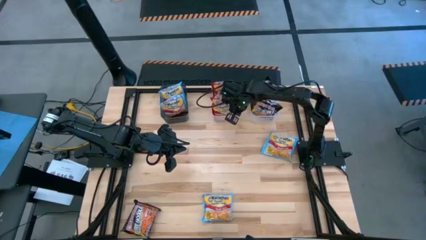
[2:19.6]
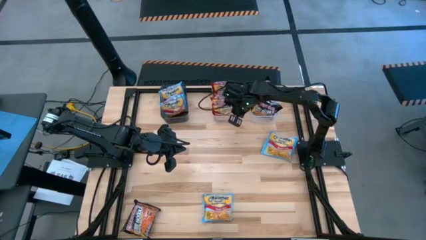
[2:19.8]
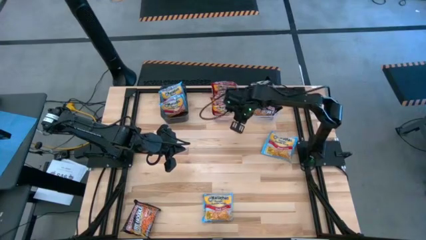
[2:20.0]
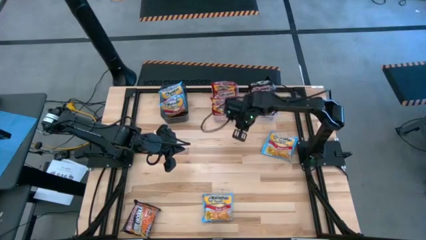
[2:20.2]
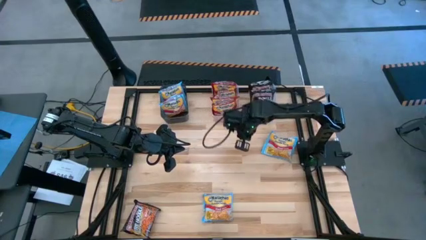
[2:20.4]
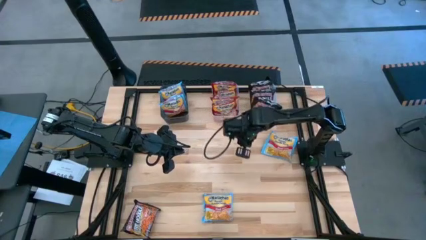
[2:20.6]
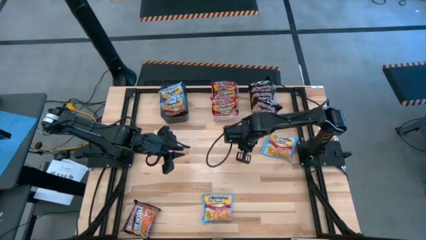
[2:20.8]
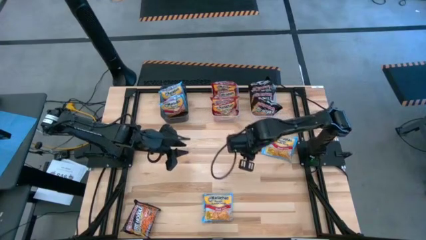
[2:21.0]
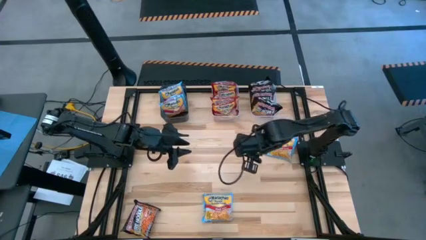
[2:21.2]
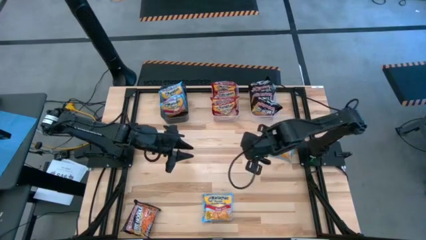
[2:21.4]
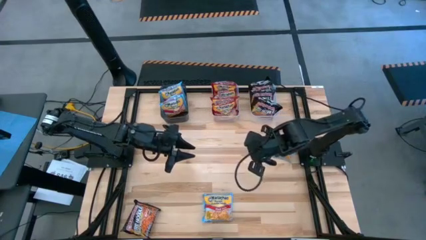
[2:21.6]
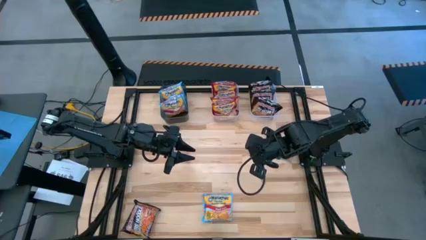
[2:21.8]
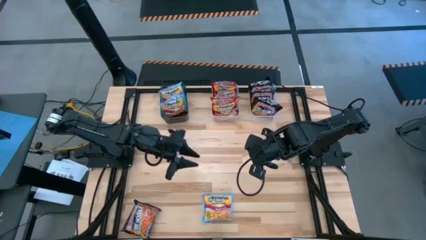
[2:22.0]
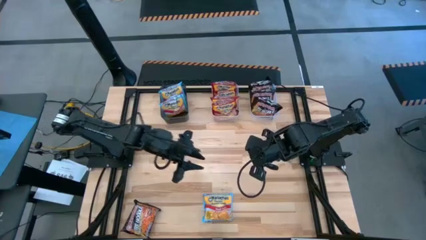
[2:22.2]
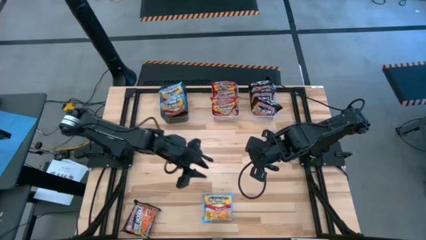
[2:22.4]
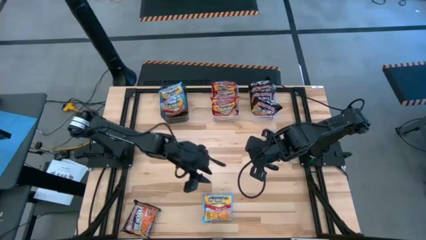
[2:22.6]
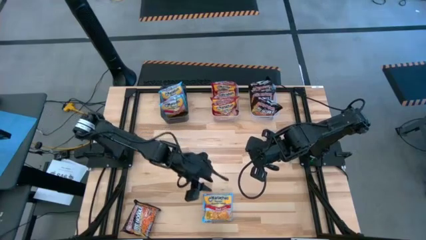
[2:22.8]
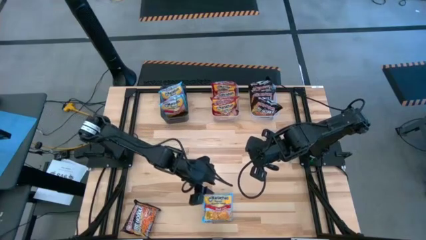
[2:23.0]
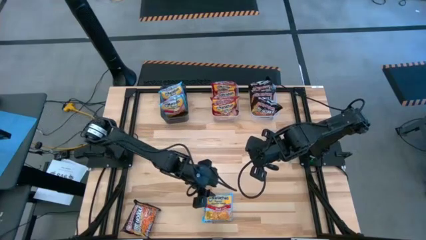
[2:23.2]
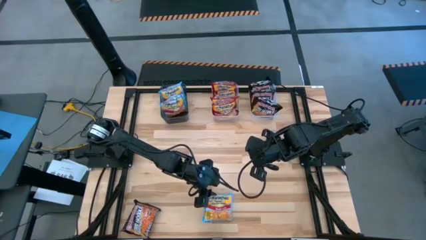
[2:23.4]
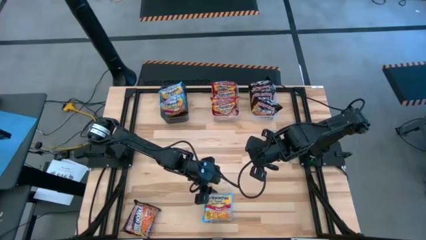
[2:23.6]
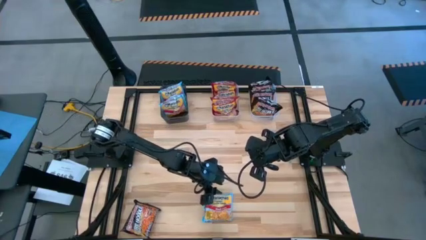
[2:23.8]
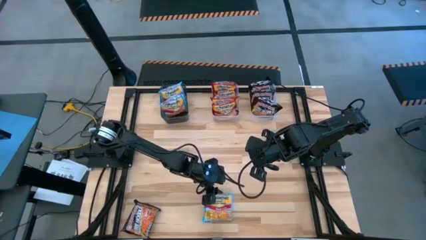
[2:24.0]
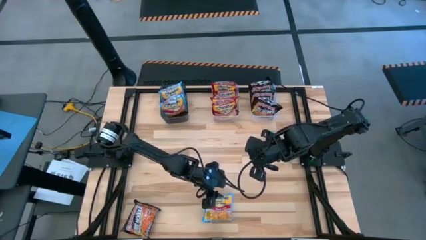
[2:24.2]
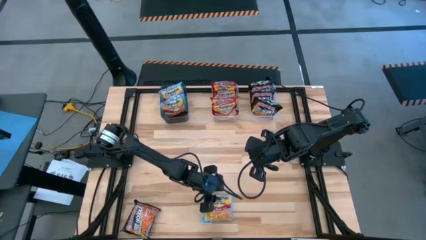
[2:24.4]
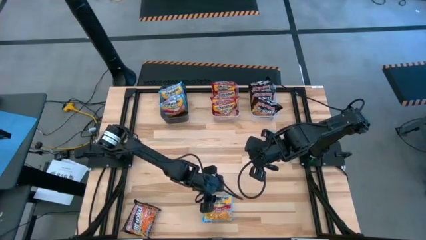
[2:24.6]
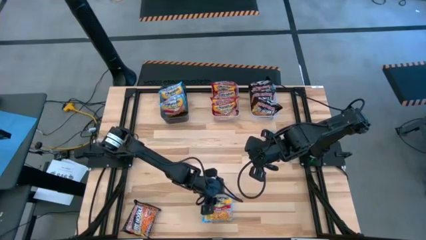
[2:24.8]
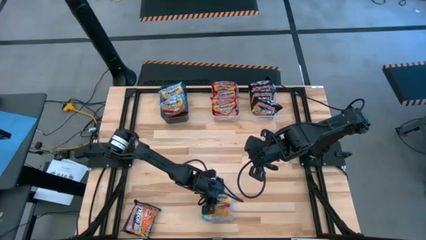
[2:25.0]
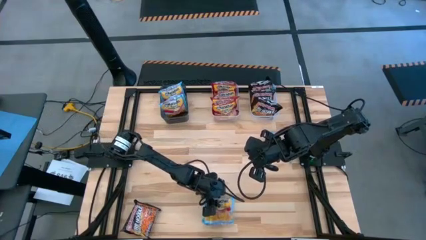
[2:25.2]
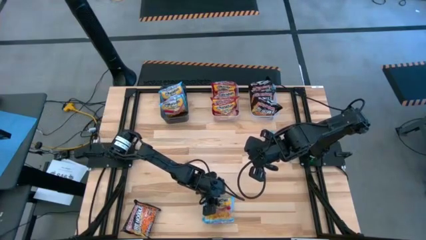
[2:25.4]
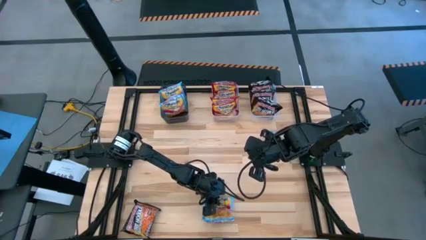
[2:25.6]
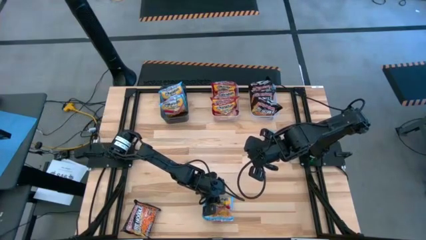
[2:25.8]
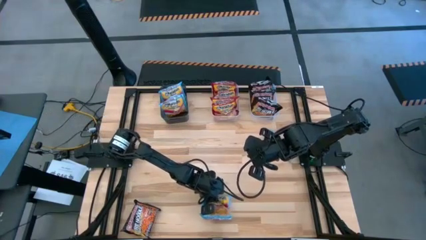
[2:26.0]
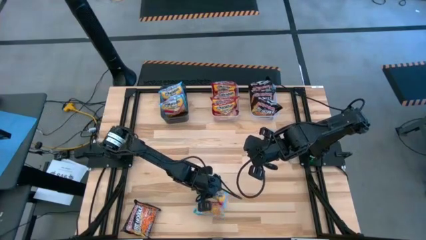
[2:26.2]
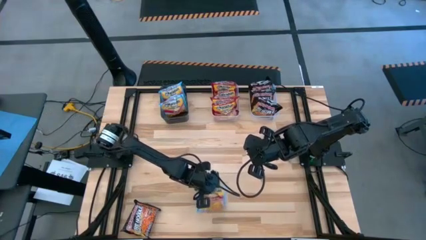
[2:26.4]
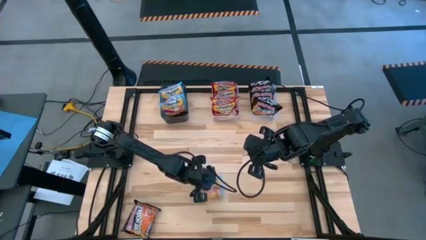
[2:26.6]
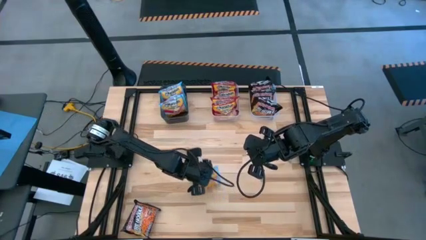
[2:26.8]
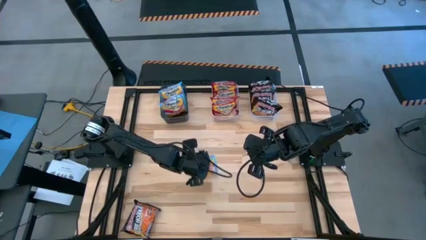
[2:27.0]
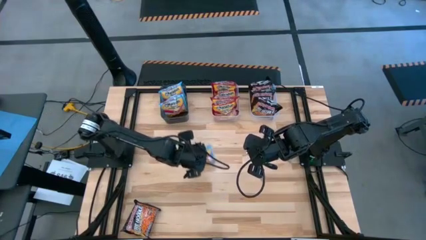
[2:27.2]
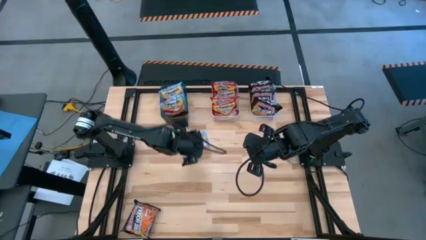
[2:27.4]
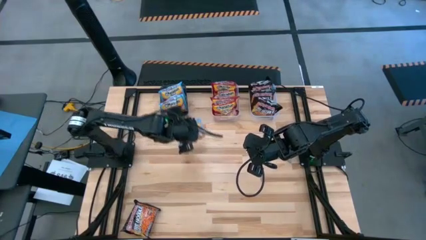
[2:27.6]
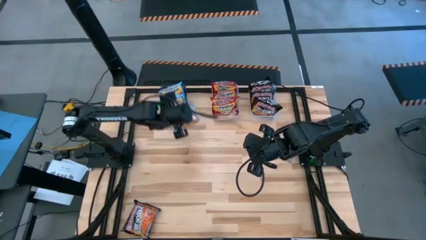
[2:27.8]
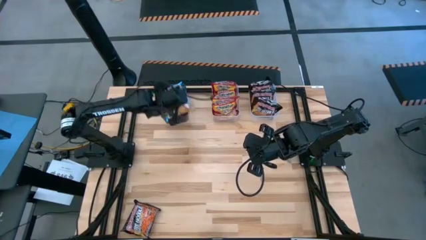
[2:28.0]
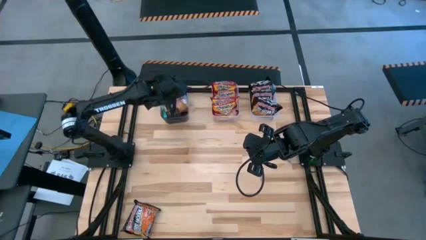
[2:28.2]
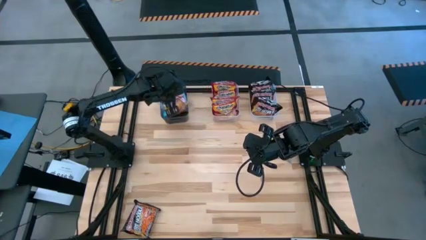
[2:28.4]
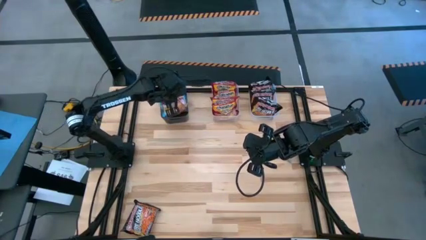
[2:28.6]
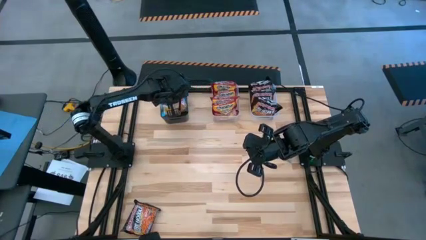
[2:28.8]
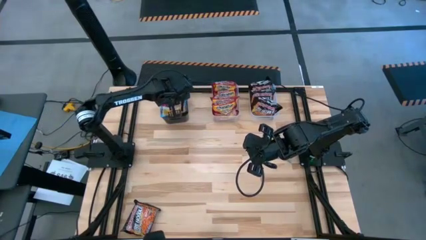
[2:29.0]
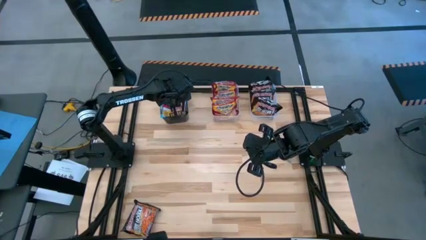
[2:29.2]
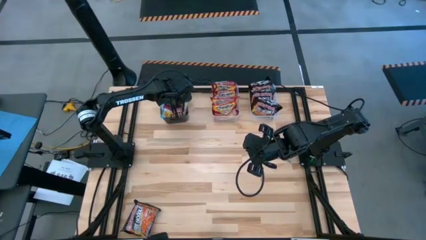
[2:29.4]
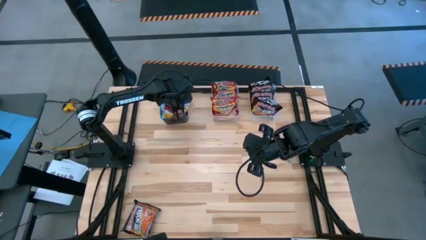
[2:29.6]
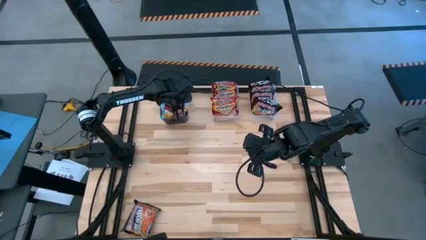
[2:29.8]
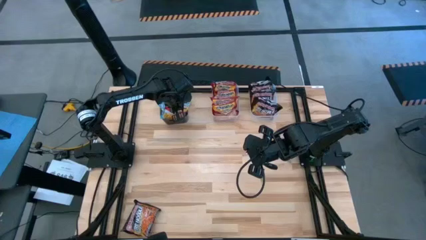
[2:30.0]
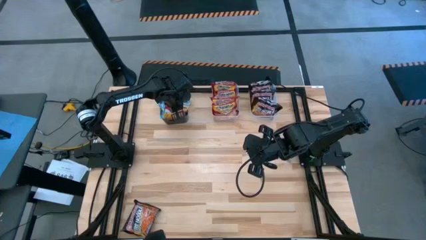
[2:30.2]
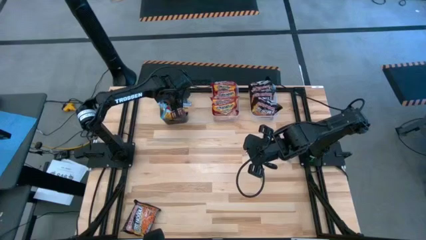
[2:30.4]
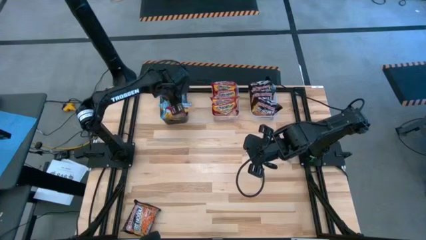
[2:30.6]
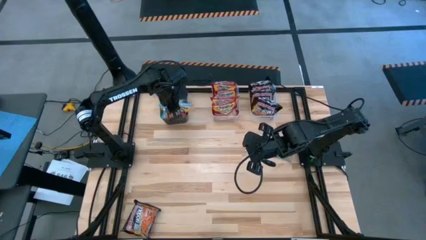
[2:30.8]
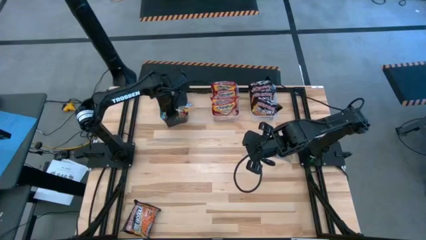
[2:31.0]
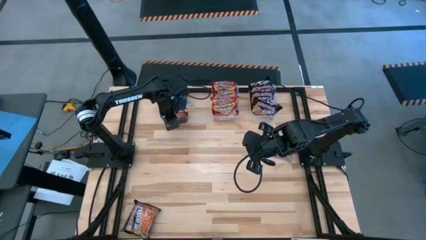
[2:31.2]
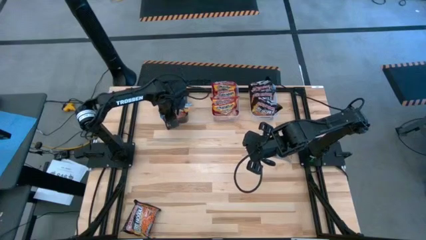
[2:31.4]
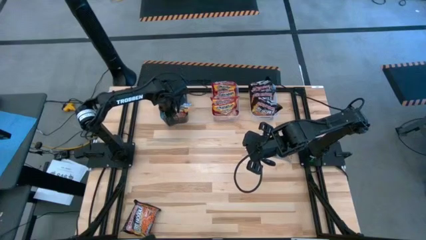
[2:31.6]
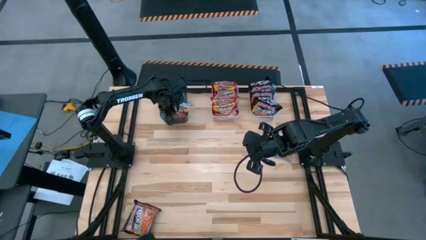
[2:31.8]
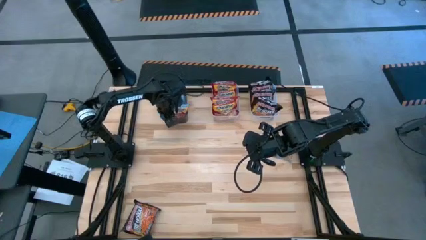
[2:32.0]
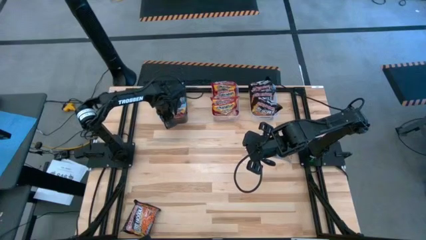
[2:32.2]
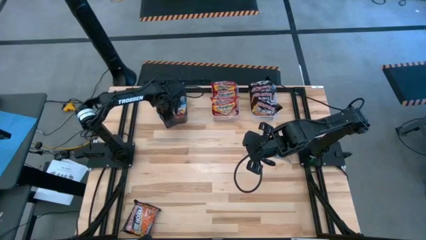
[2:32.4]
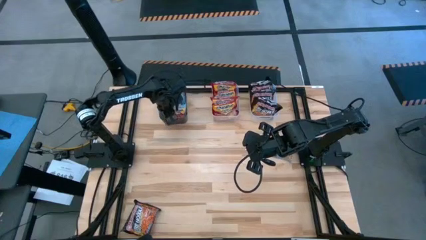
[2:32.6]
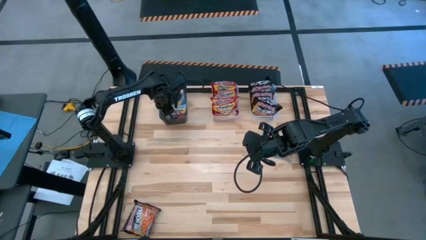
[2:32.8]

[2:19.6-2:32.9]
Task: Sort Maruchan noodles
Put the blue noodle pack into the black bin

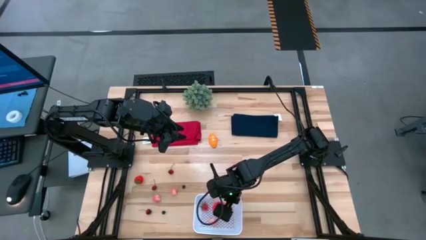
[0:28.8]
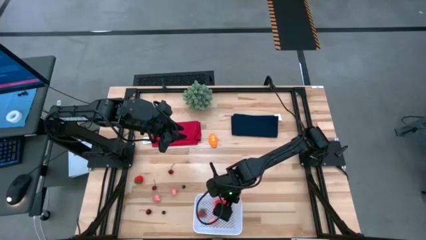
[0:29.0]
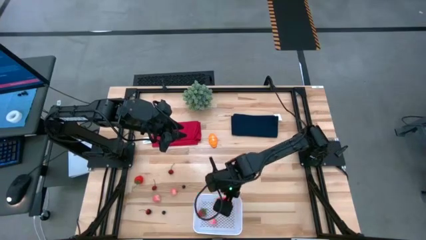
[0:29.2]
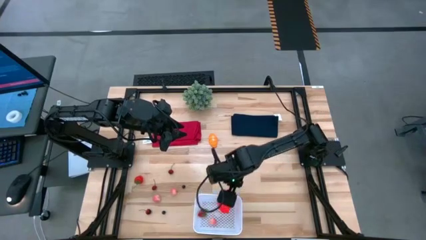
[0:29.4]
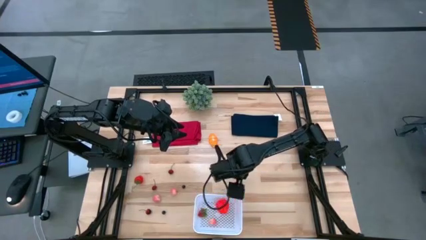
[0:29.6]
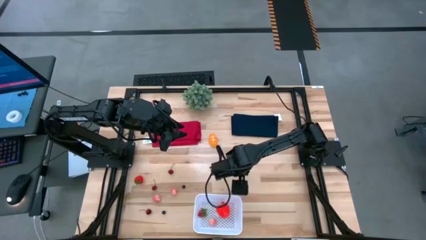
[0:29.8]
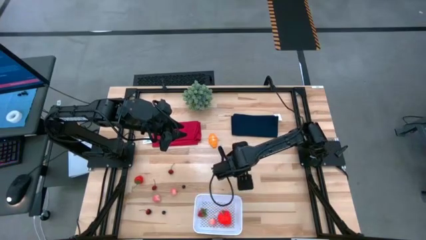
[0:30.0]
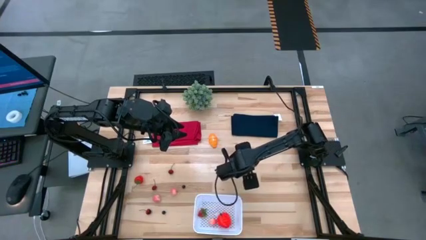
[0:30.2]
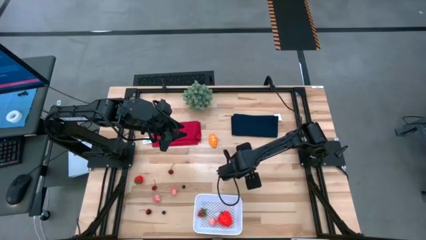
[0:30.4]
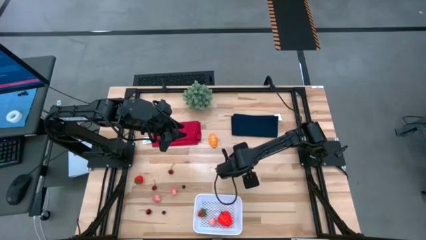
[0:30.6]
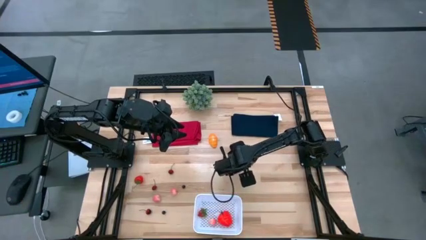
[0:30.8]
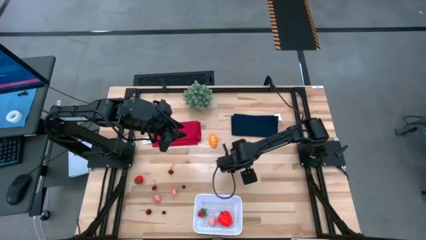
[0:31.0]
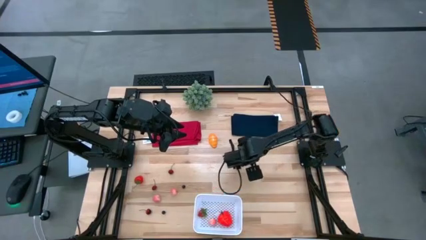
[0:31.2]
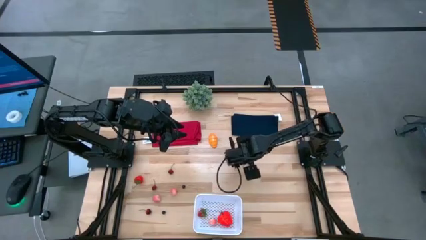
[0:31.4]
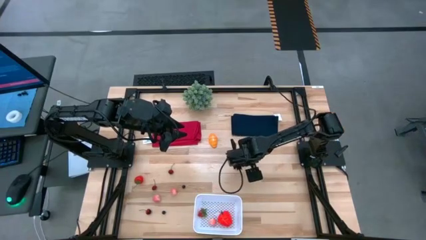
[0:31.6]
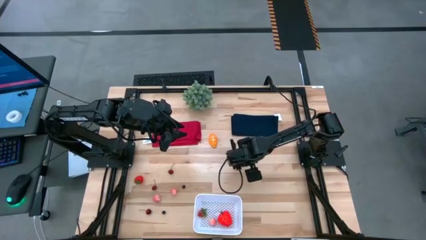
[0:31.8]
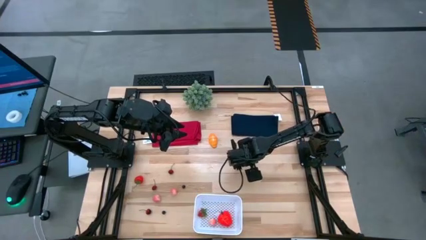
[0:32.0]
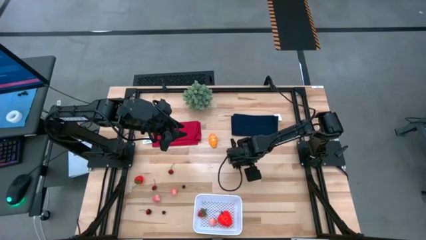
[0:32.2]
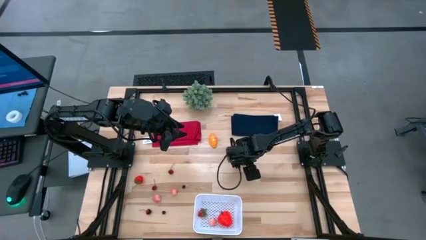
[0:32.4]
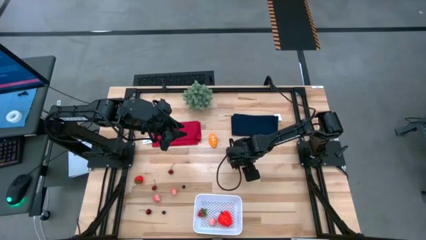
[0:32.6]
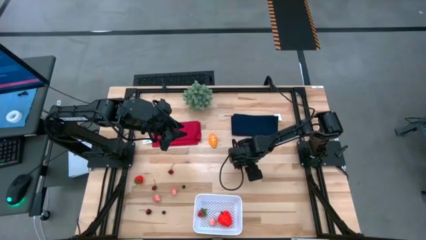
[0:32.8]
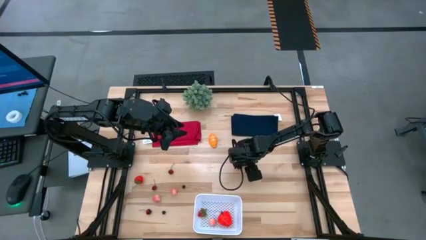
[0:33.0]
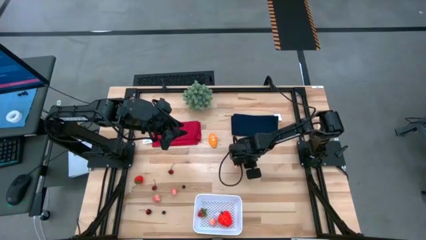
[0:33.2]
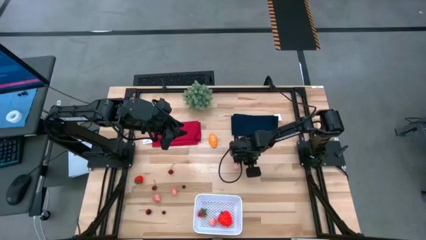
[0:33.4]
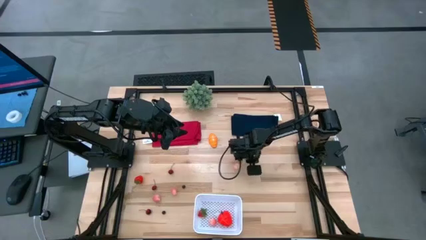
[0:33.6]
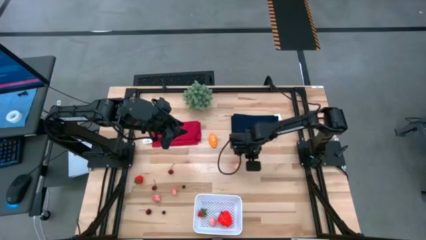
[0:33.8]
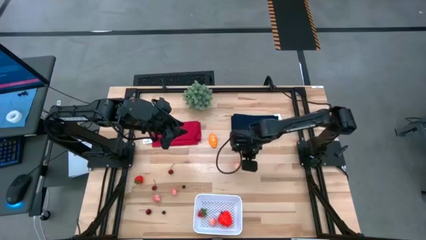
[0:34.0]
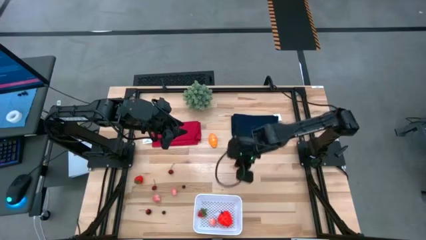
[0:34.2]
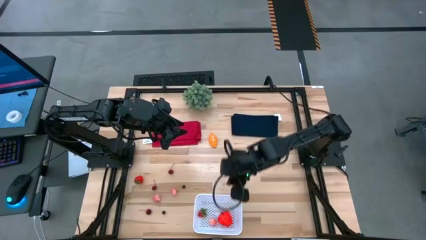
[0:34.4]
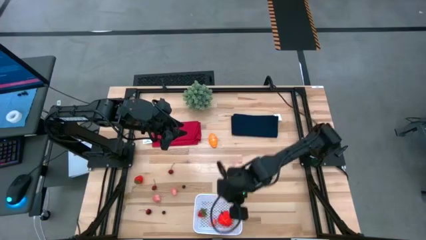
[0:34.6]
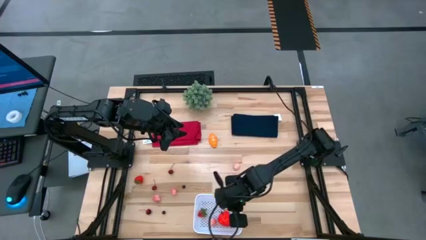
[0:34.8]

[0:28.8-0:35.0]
Task: Pick and placing Produce into tupperware
Put the cherry into the white bin
